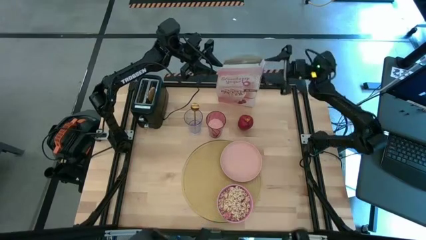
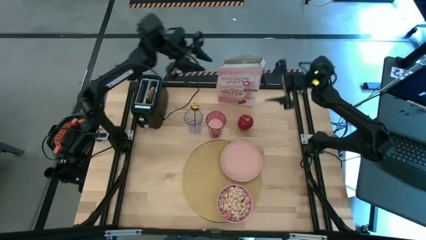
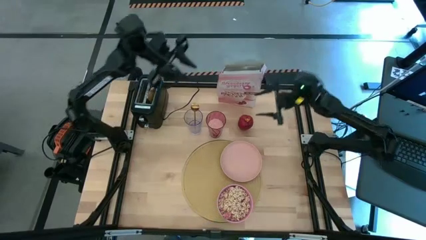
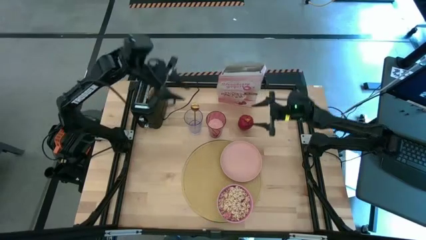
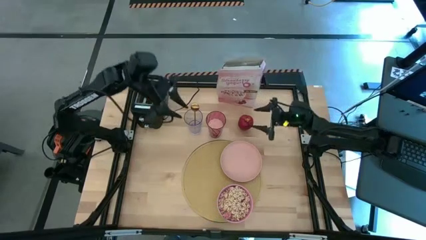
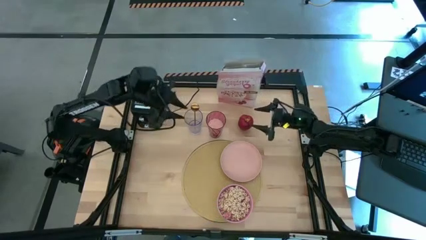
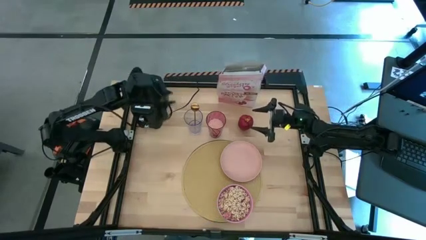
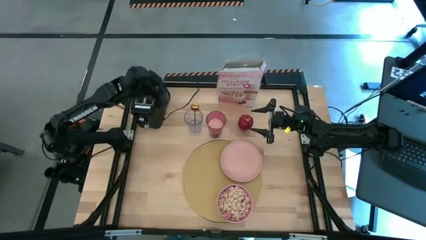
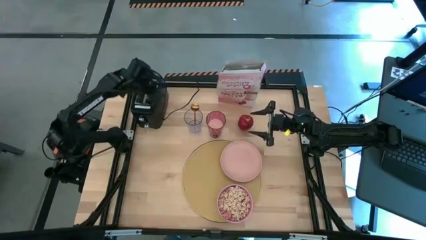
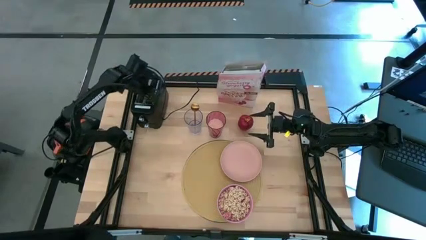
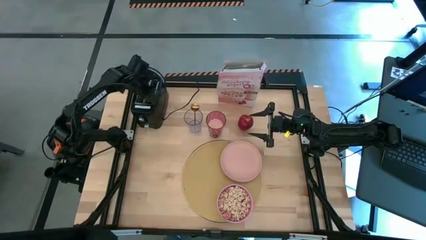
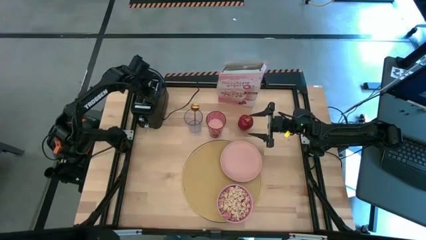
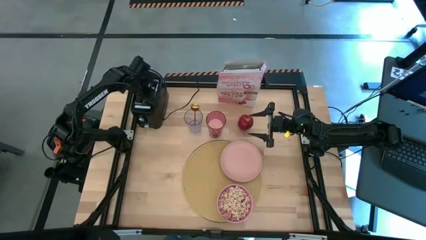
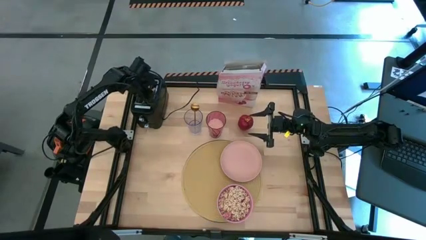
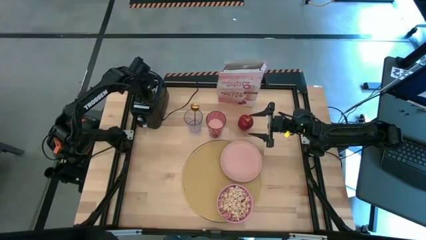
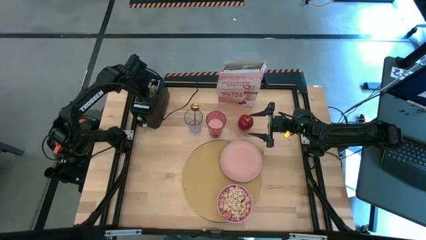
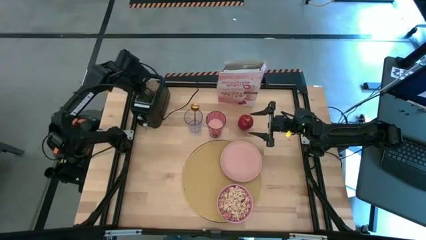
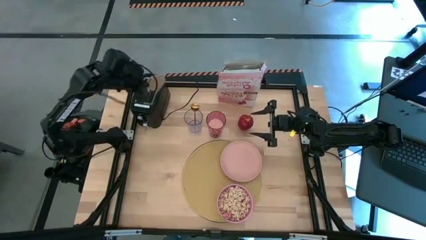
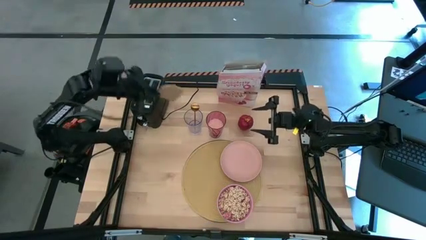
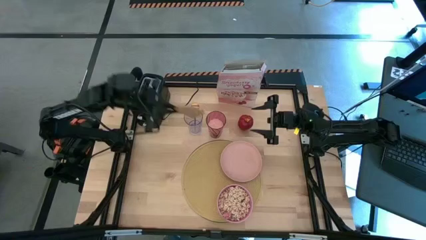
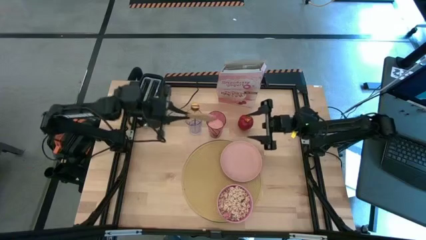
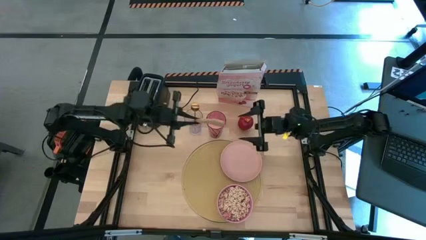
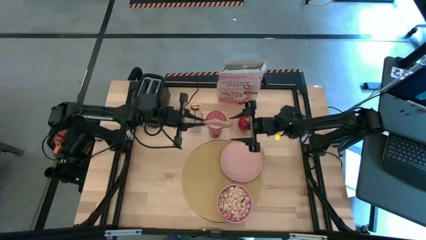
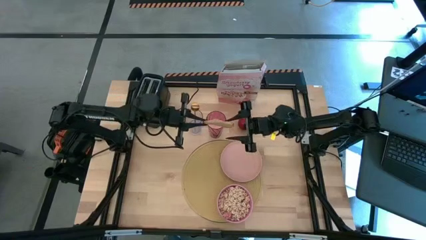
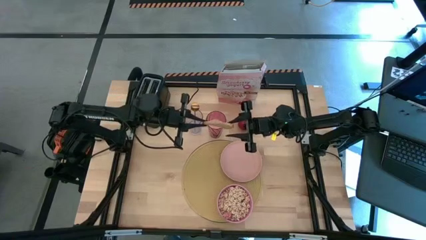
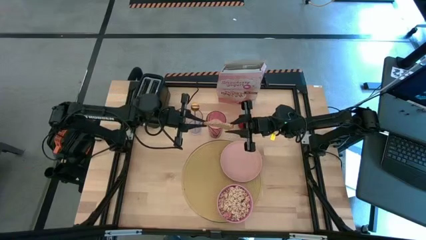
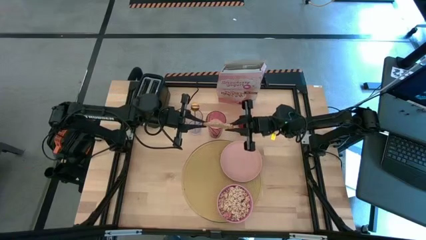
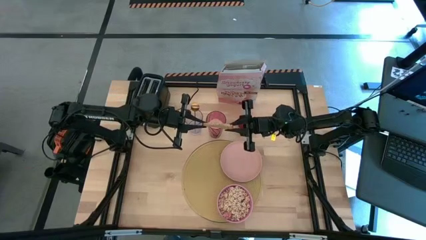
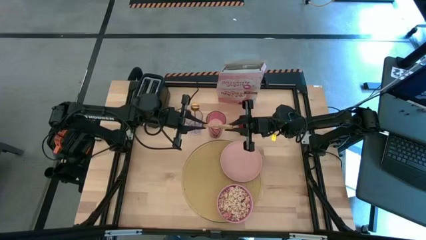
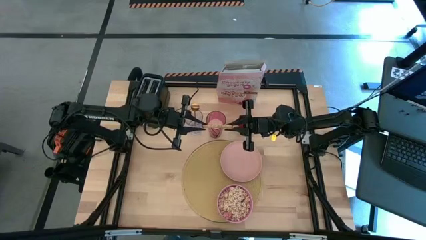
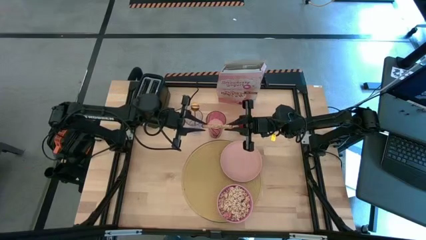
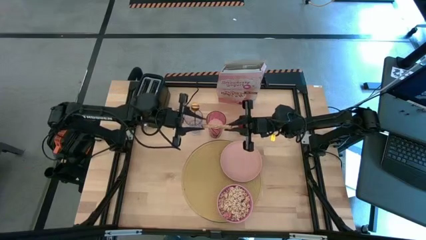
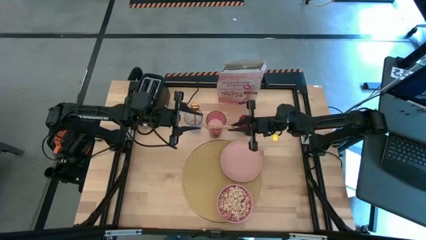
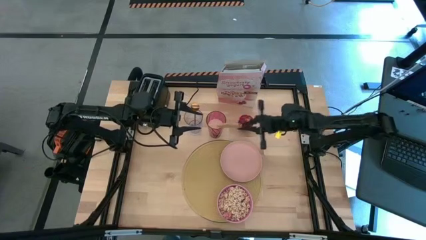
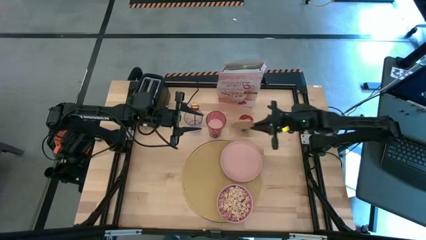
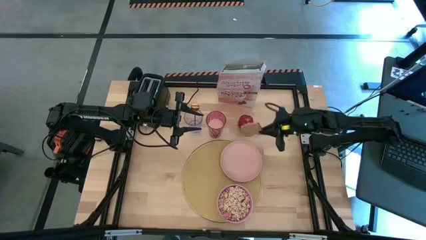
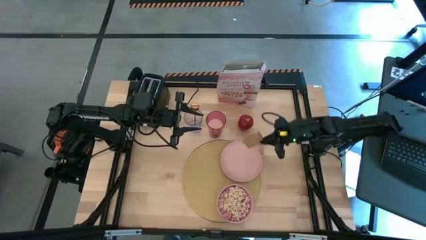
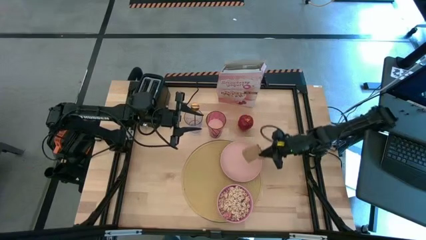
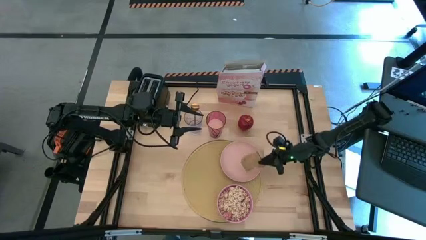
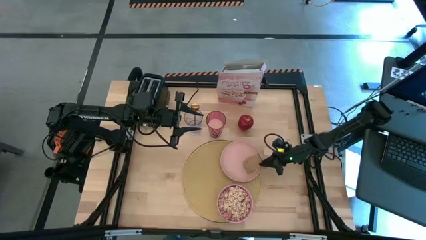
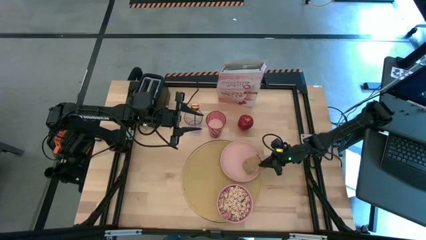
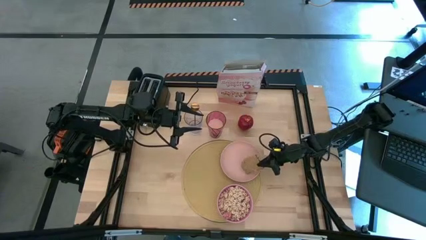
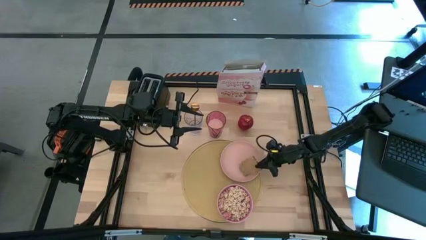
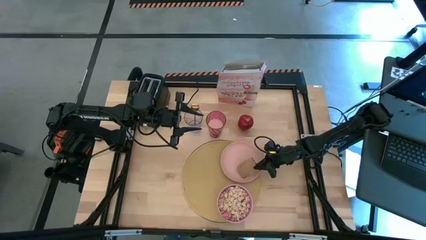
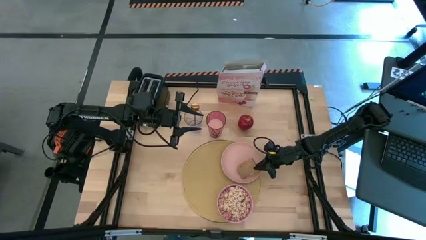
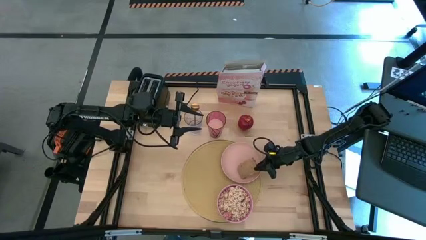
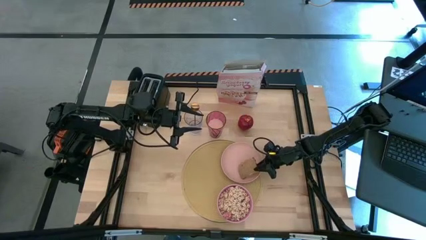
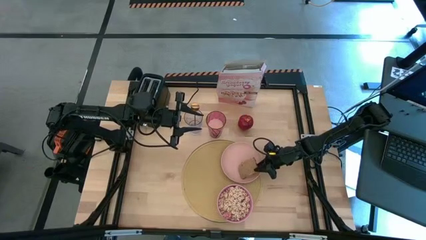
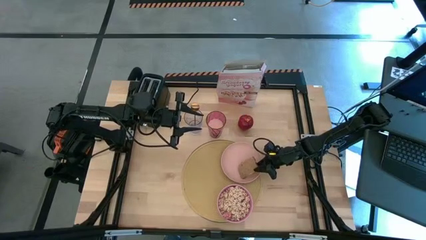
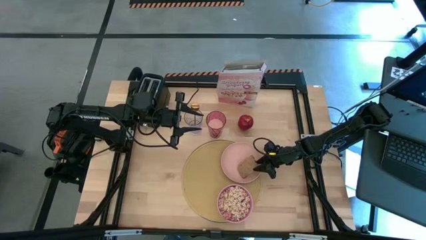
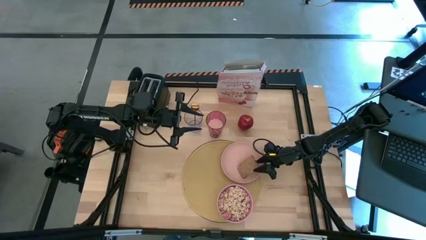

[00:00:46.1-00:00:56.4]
Task: Arrange a breakfast setting
Put the toasted bread on the pink plate

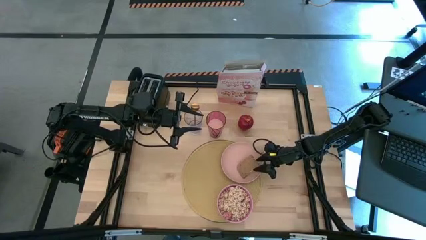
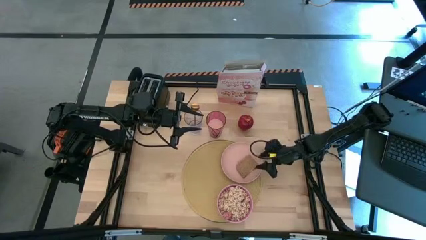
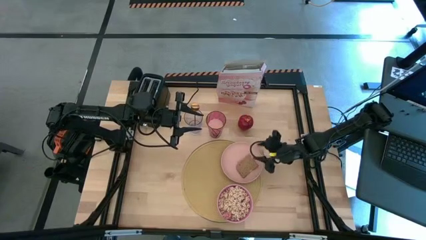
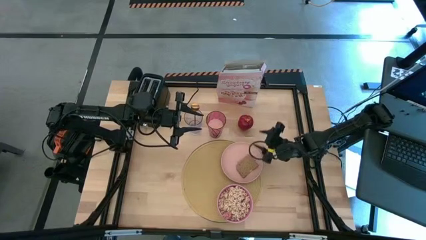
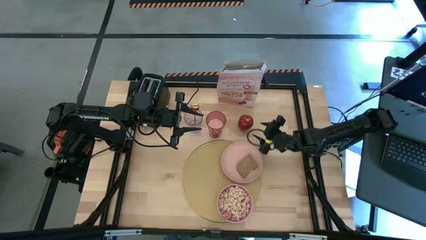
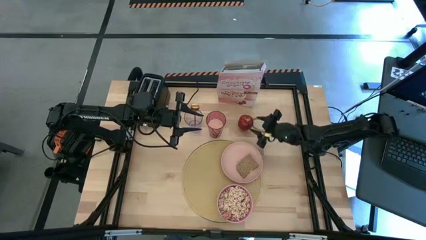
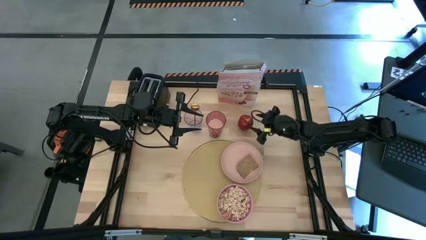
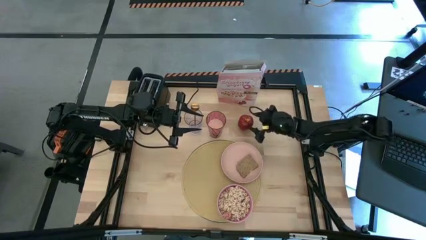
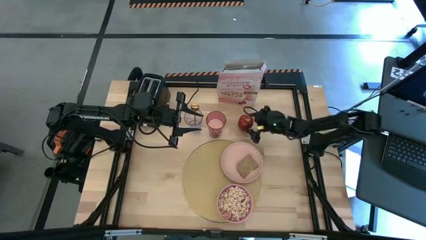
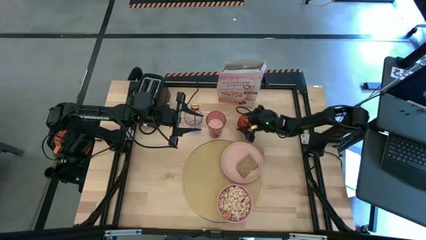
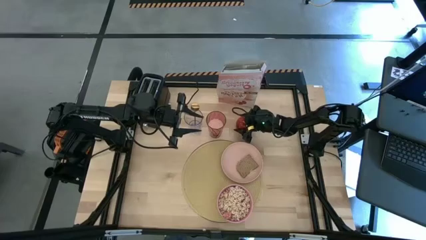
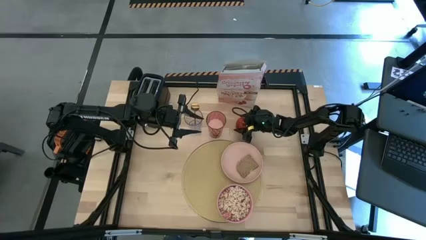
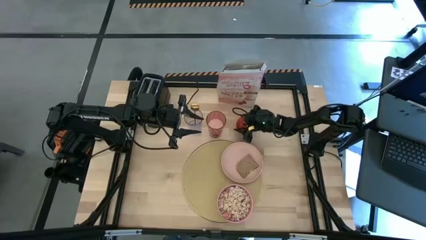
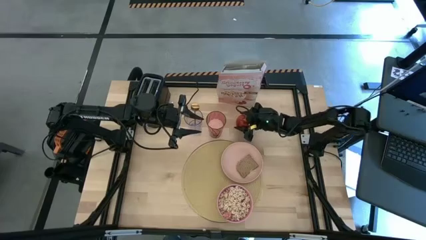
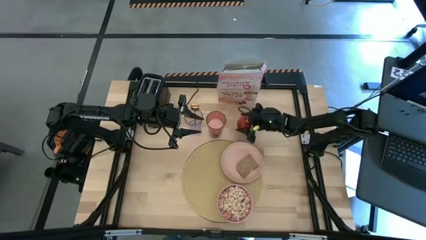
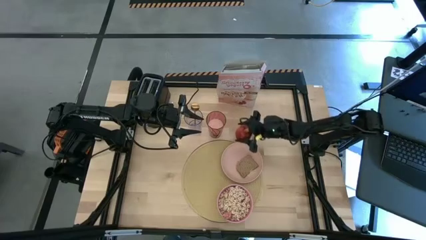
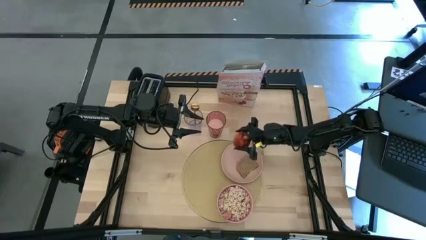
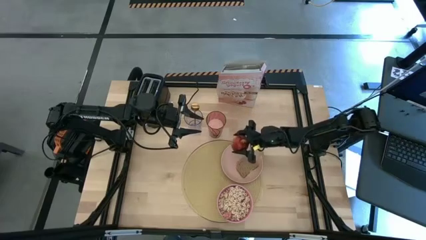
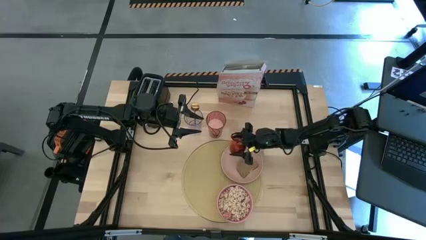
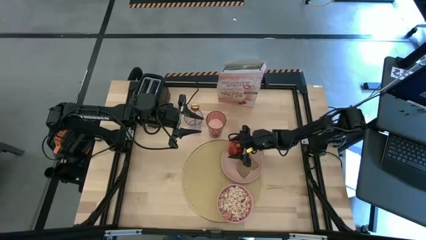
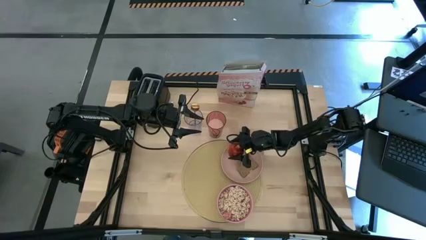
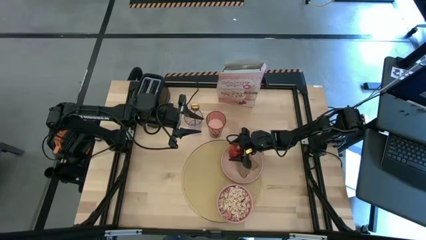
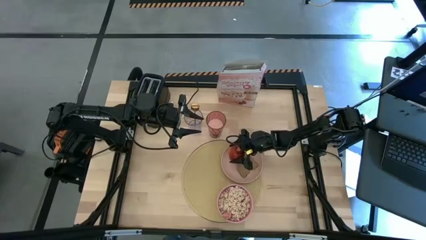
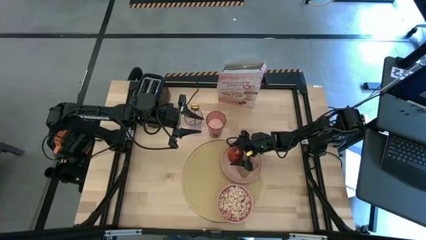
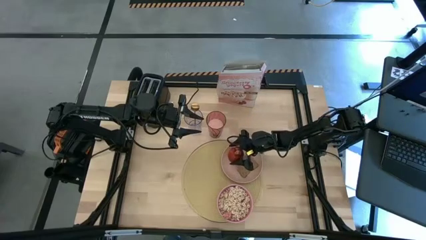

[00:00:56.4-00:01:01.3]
Put the apple to the top left of the toasted bread on the pink plate
